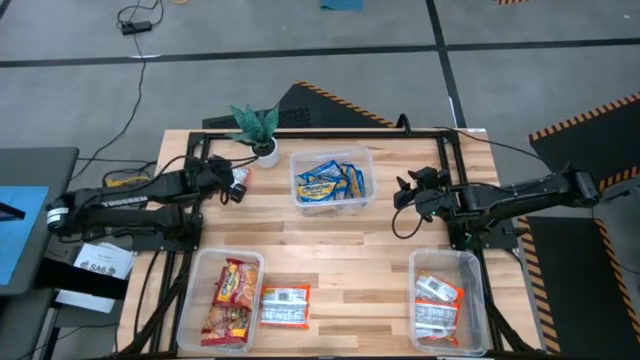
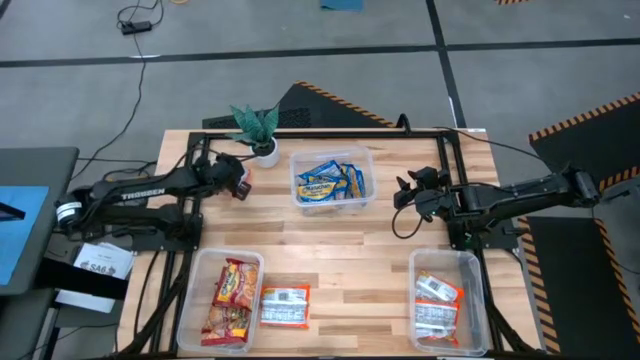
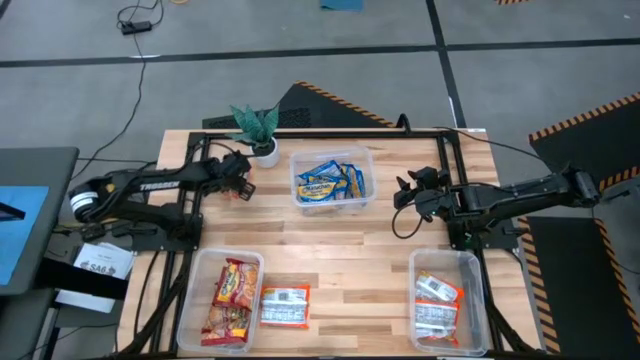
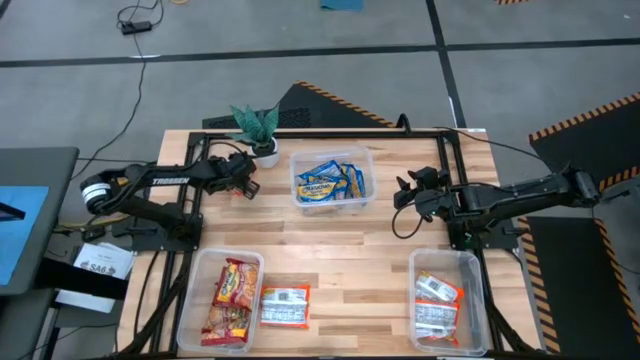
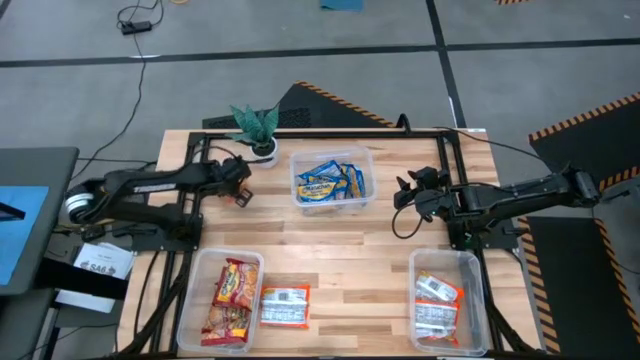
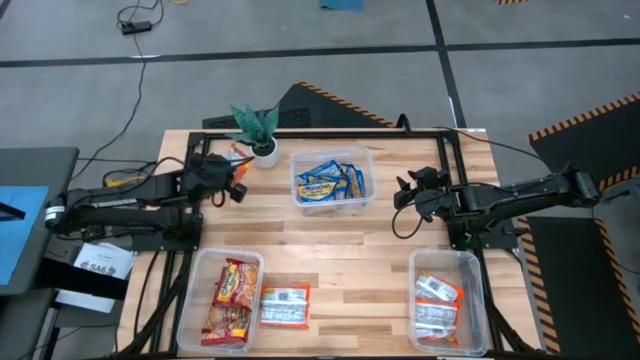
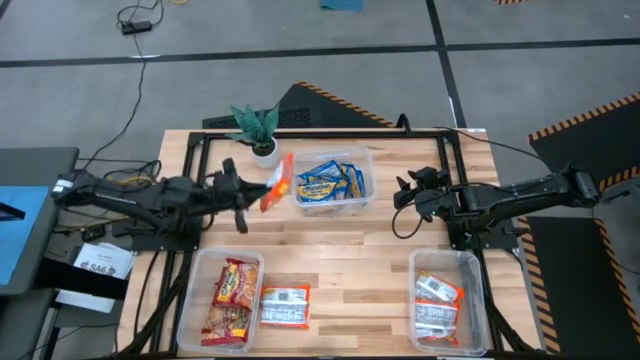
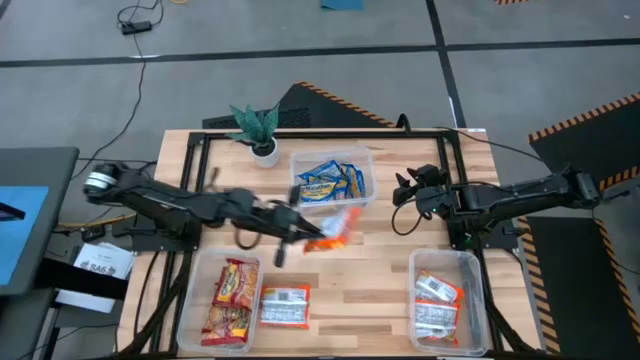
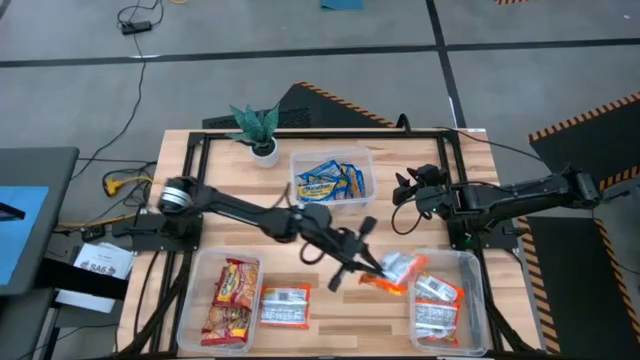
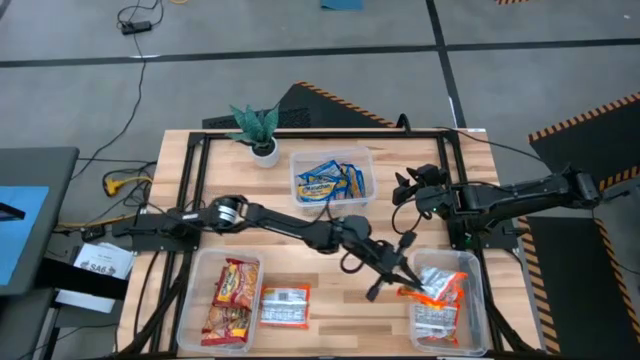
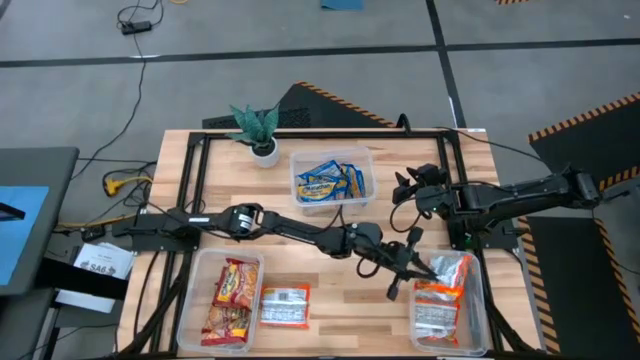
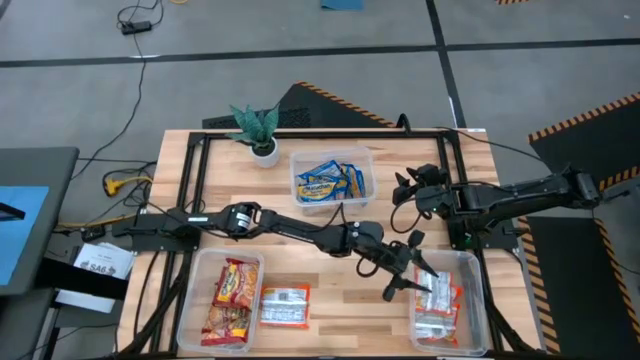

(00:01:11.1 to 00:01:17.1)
Task: Sort Maruchan noodles
Put the top orange noodle packet into the bottom right transparent bin

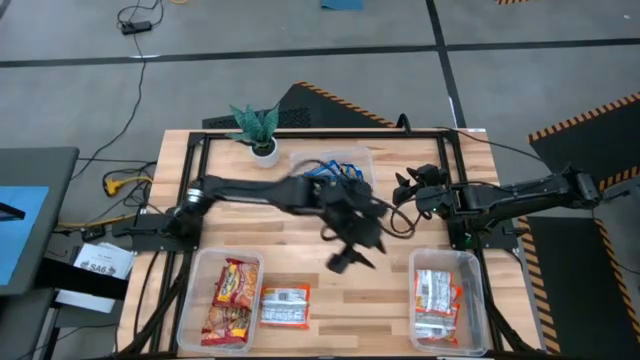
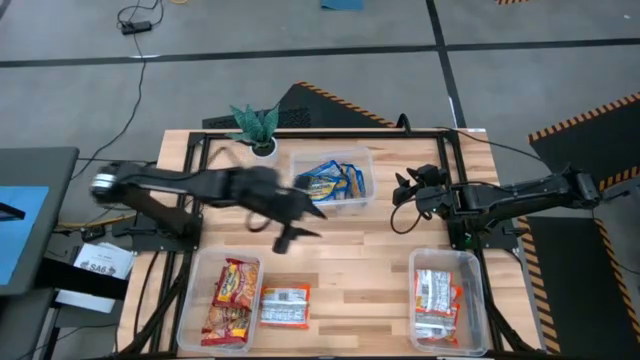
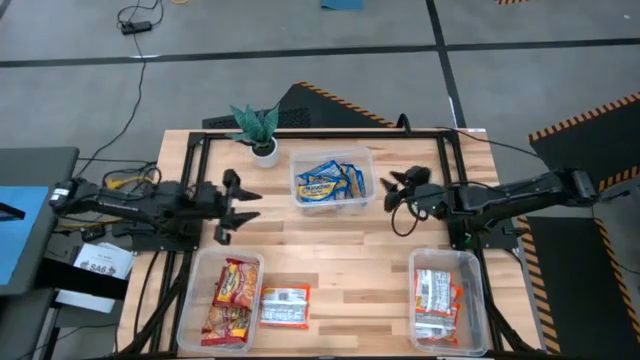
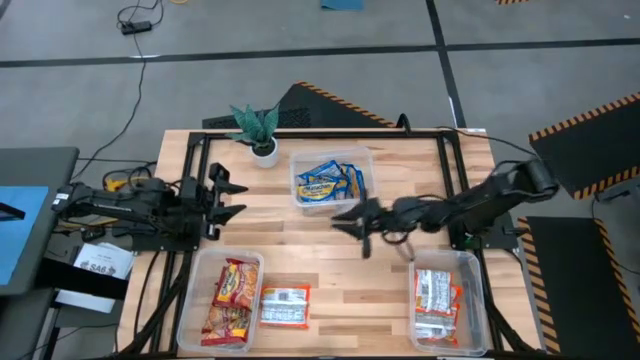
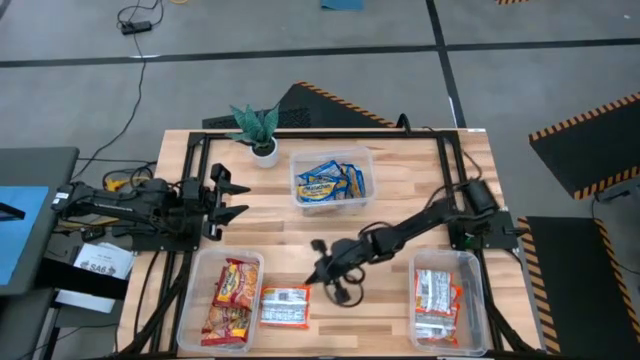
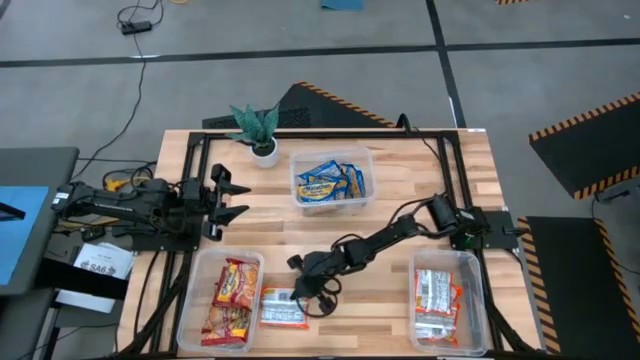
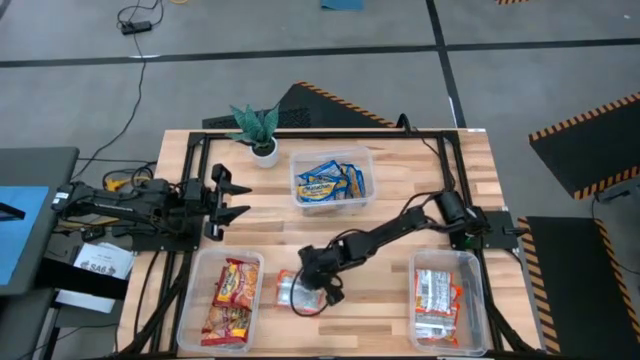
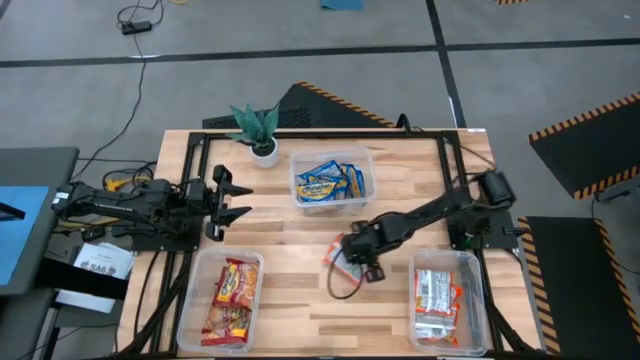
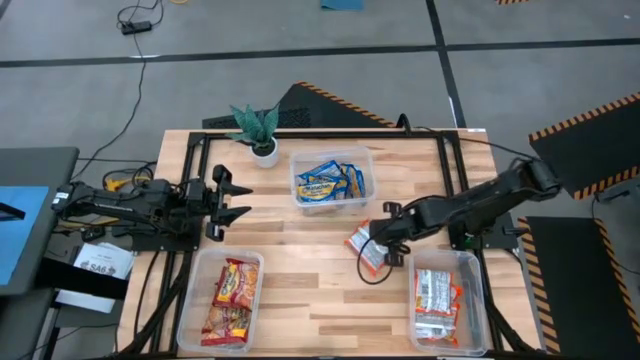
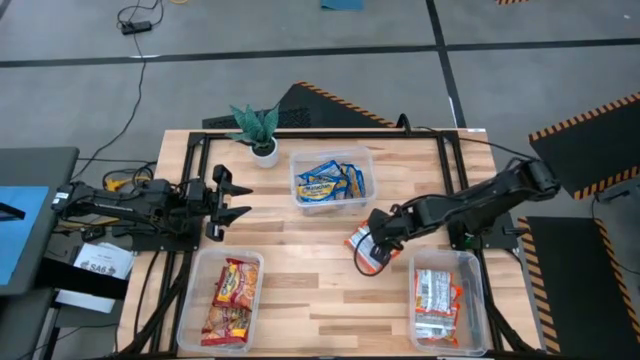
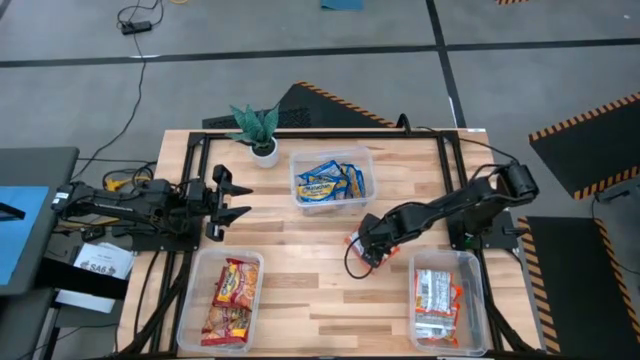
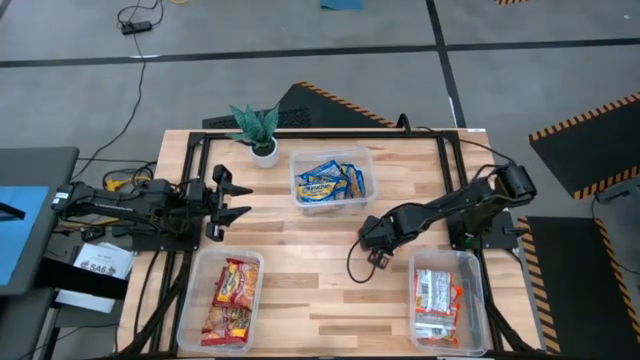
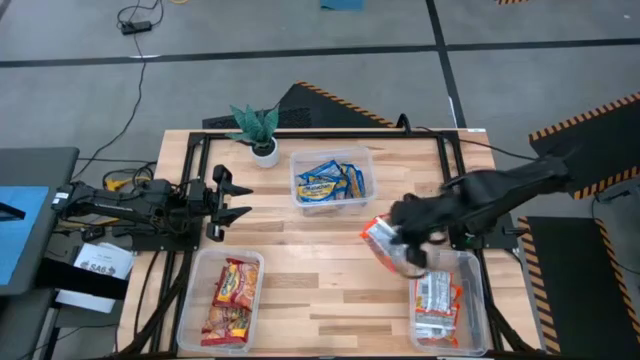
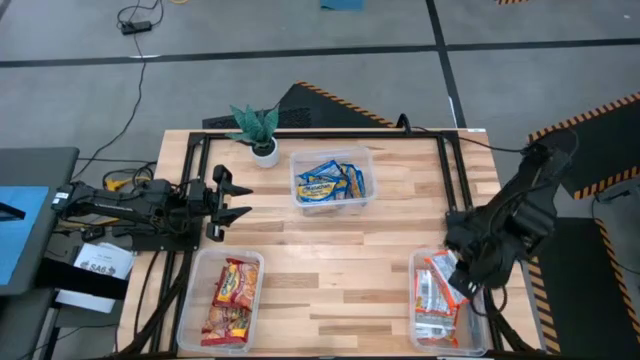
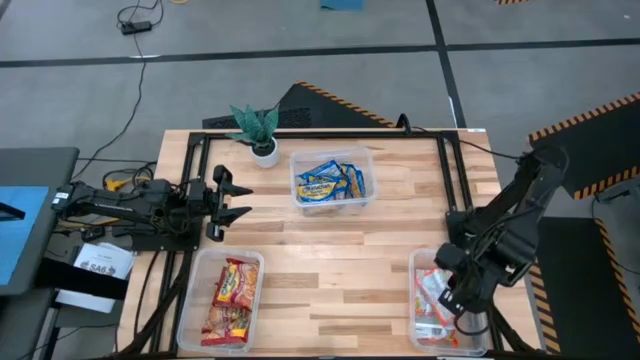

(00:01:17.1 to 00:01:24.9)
Put the orange noodle packet into the bottom right transparent bin

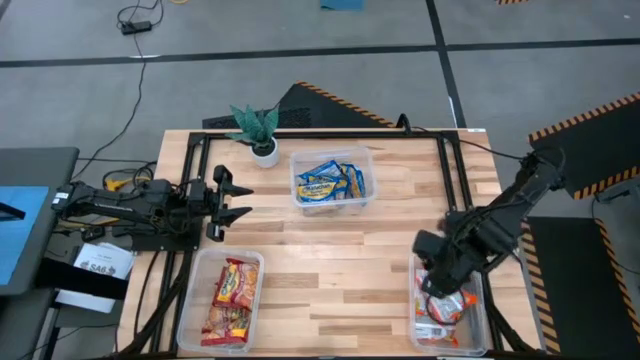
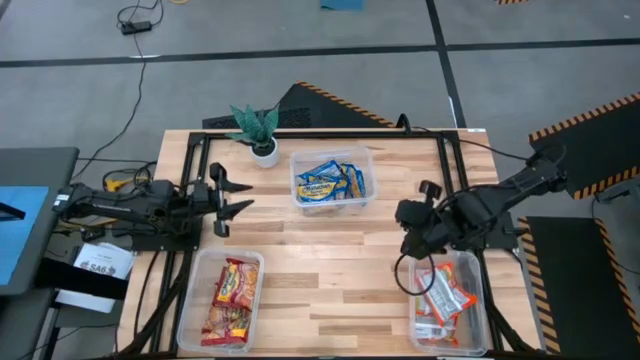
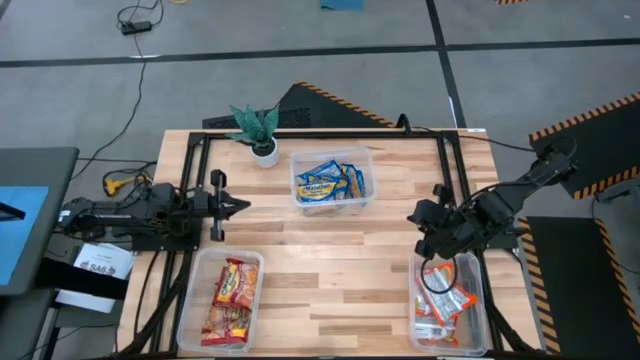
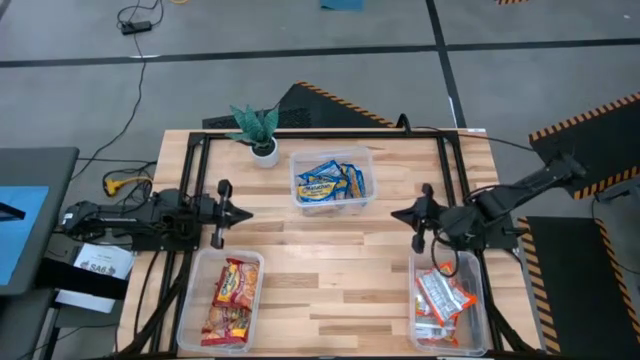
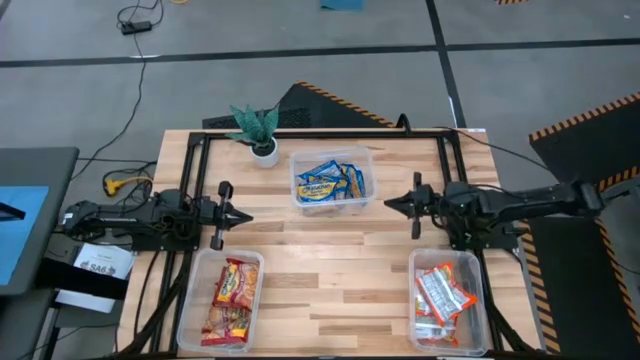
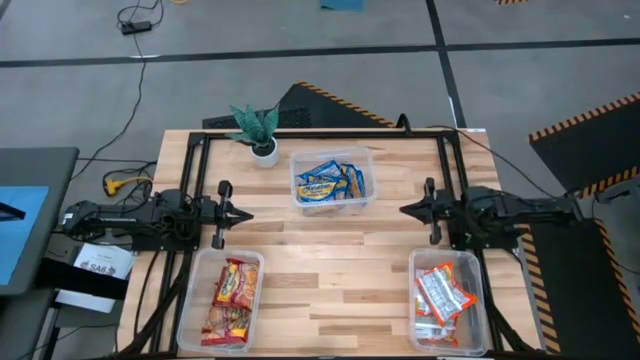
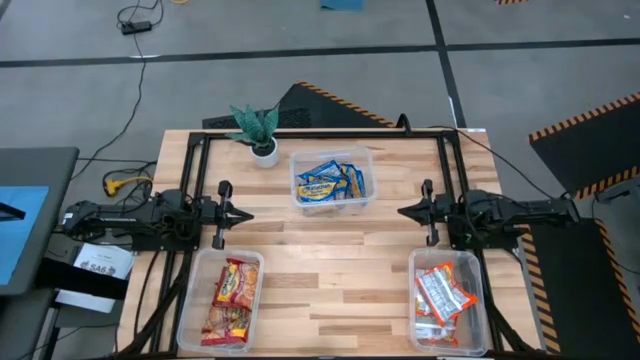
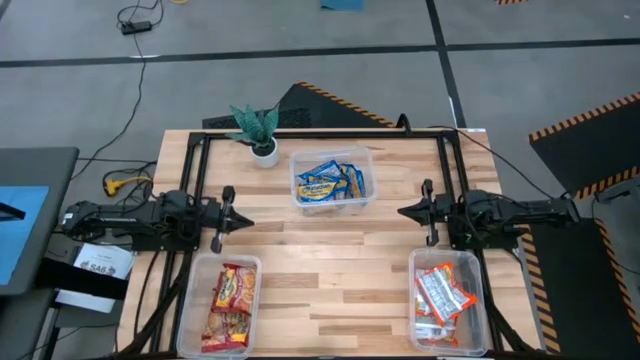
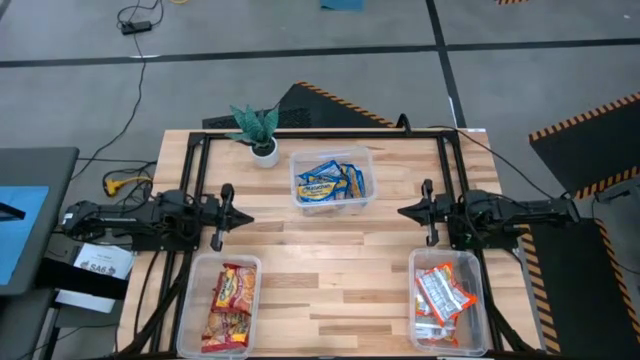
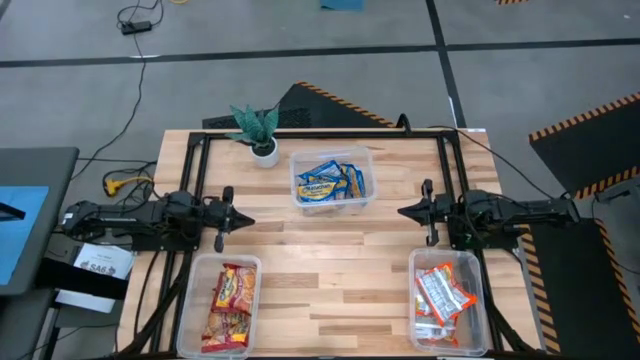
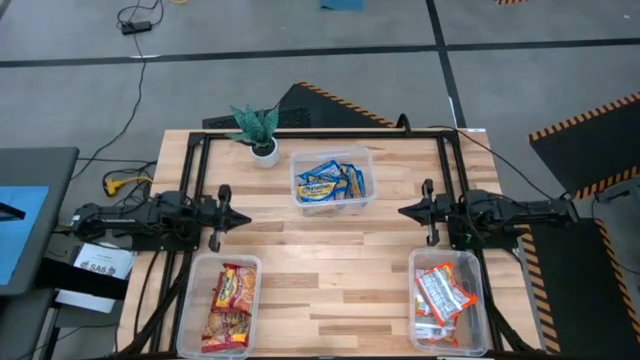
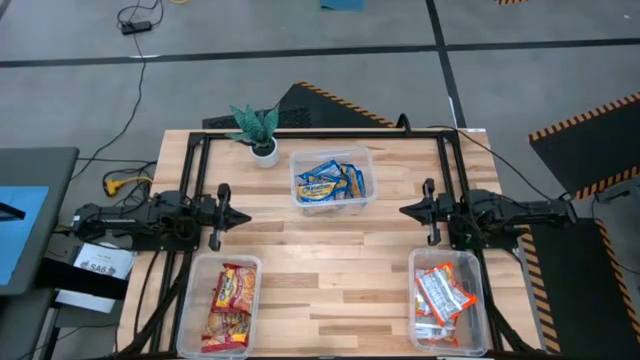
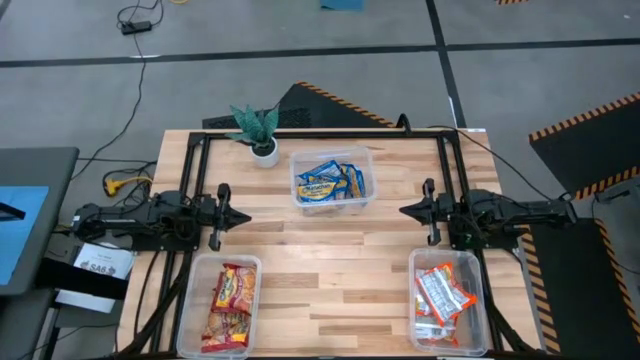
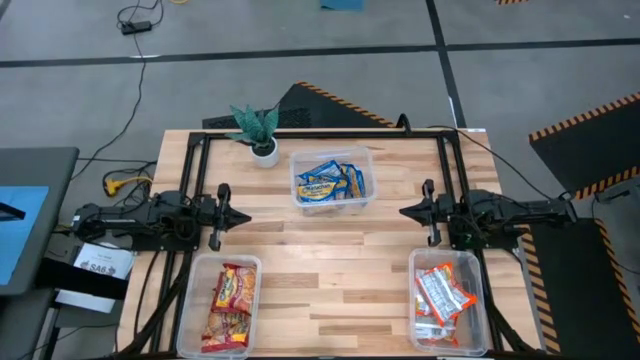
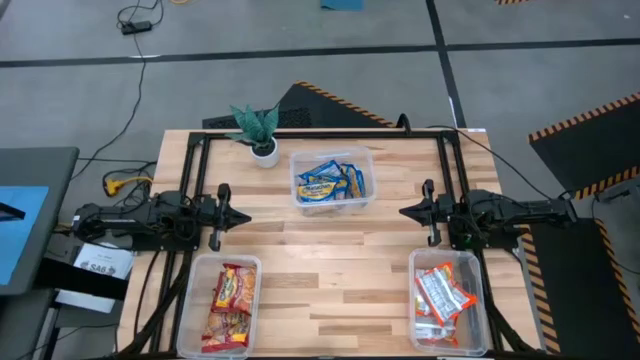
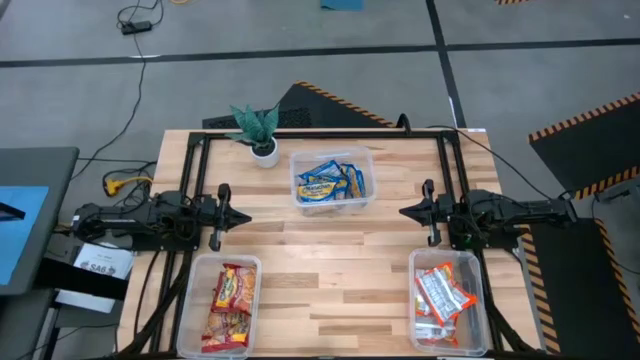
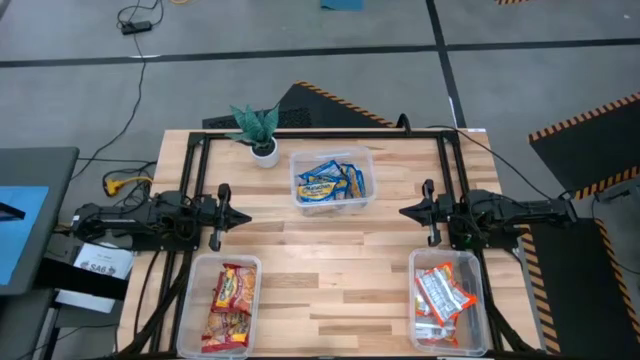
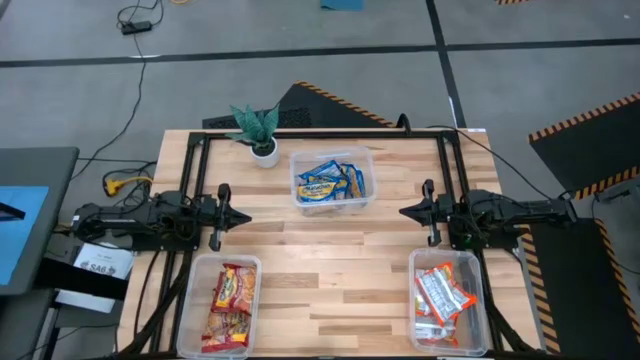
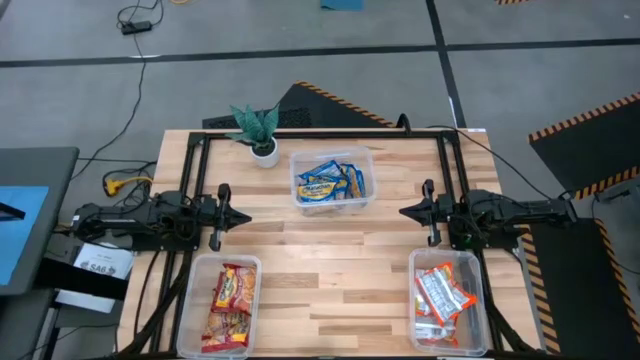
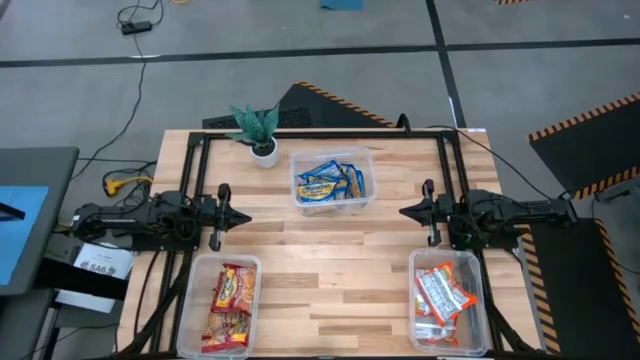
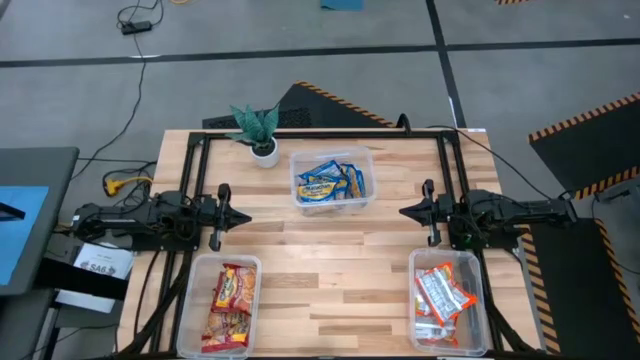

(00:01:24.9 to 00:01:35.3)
Return to Home Position
